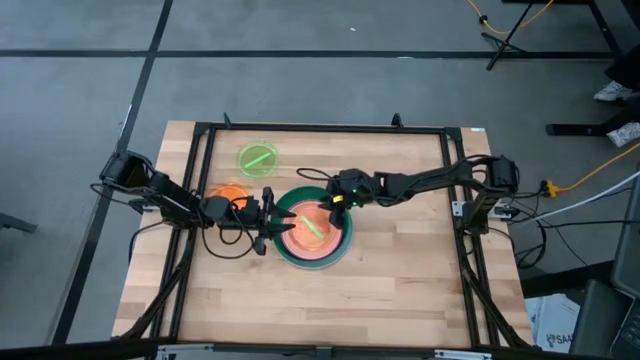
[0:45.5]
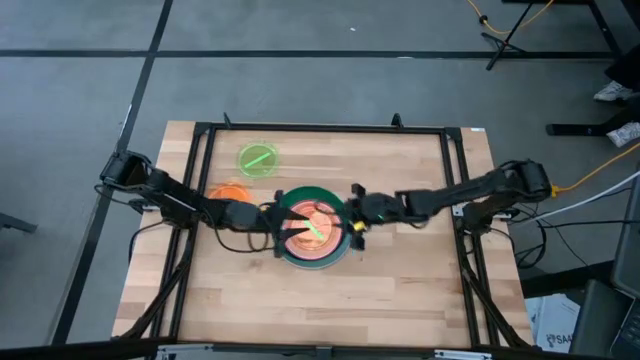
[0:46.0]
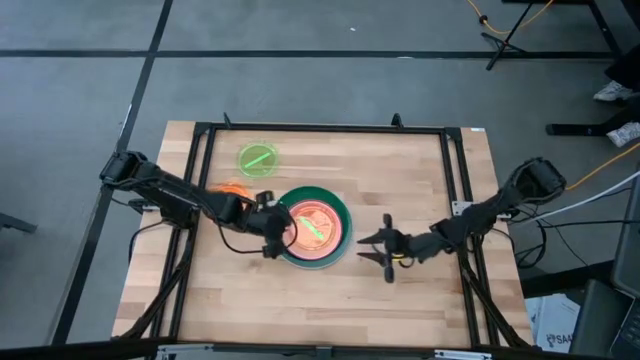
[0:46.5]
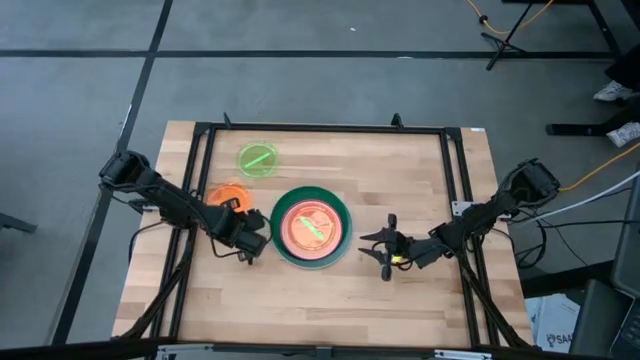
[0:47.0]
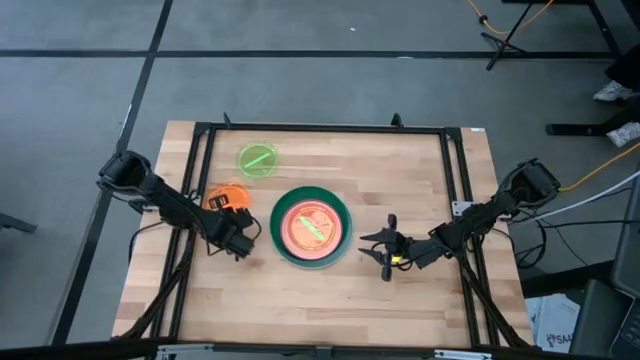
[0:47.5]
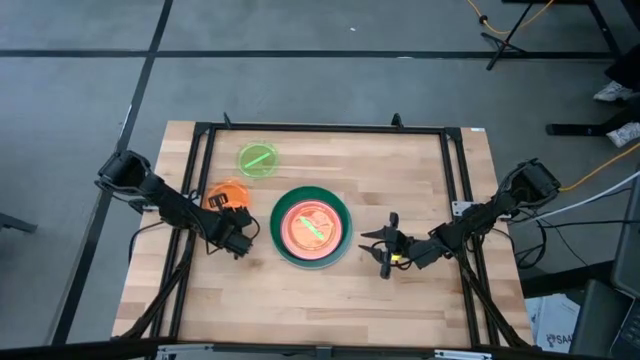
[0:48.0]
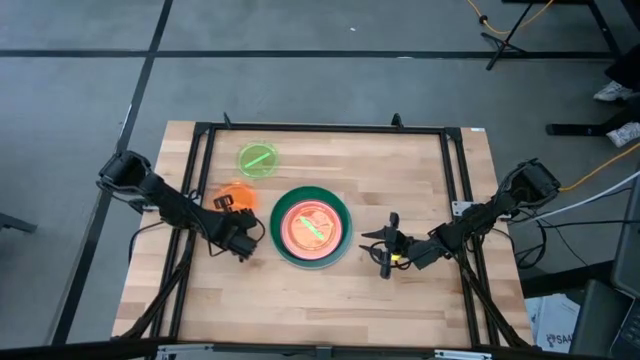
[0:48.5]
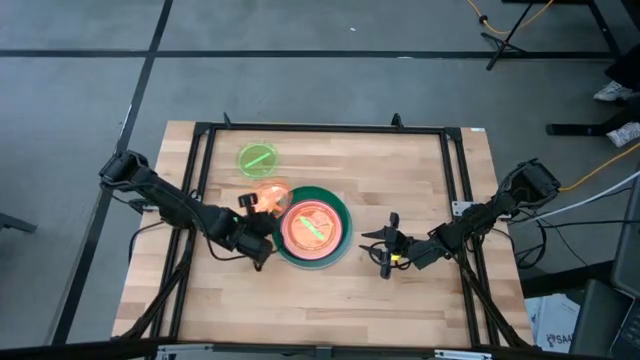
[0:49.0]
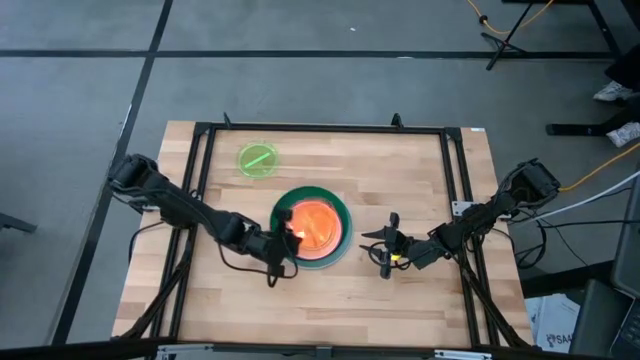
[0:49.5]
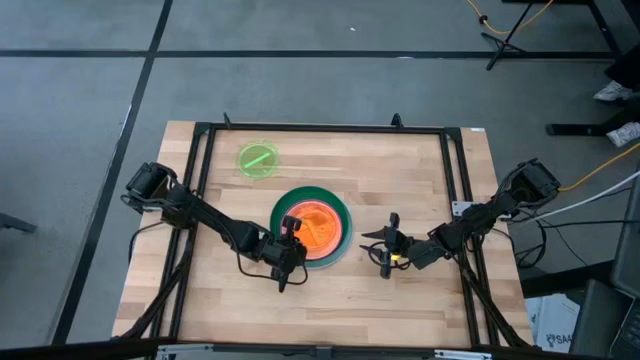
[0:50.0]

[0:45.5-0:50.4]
Task: Stack plastic plates
Stack the orange transparent plate on top of the green transparent plate

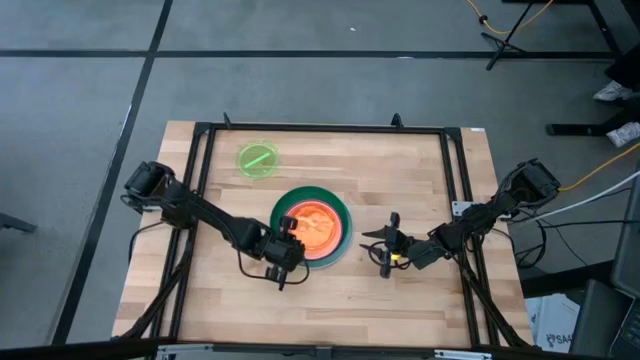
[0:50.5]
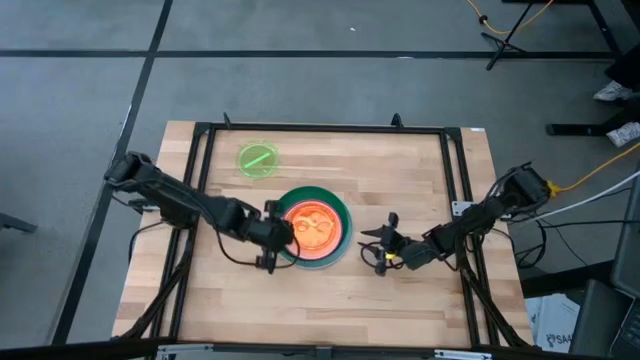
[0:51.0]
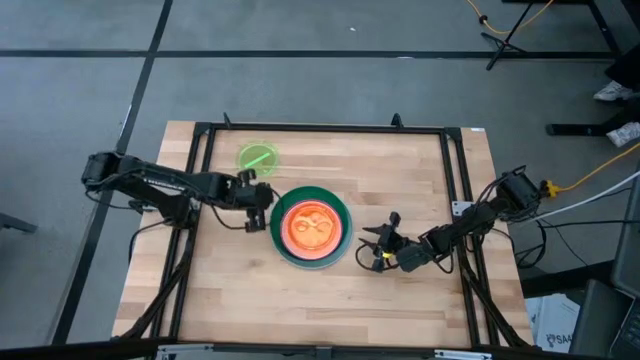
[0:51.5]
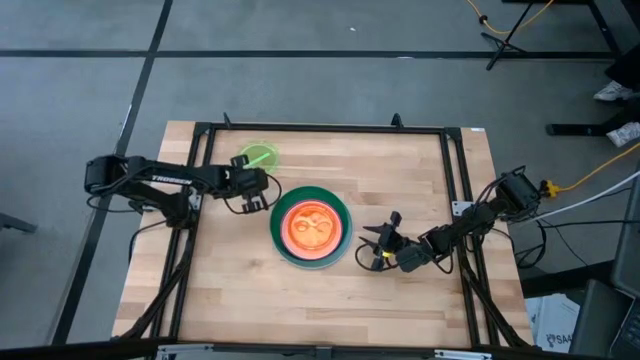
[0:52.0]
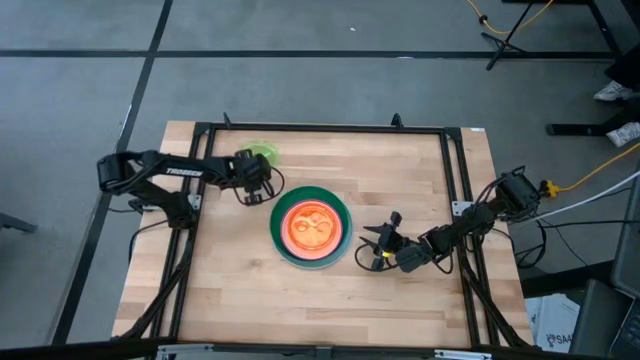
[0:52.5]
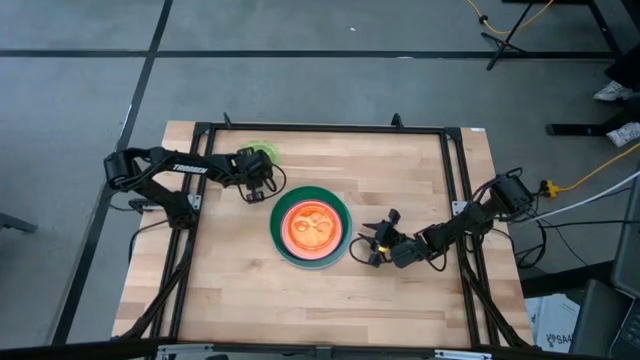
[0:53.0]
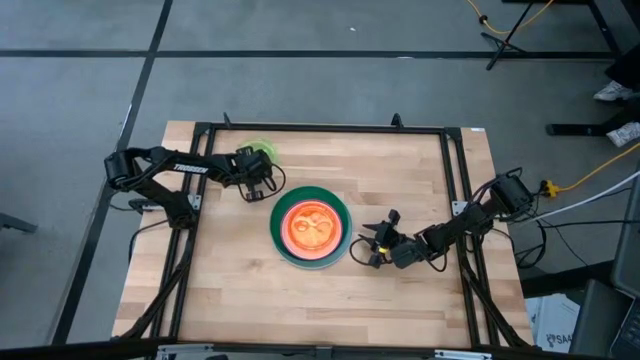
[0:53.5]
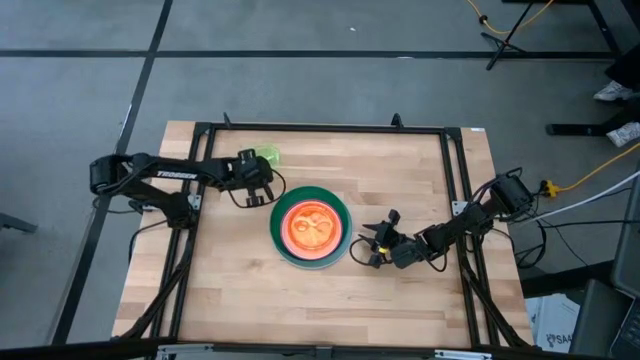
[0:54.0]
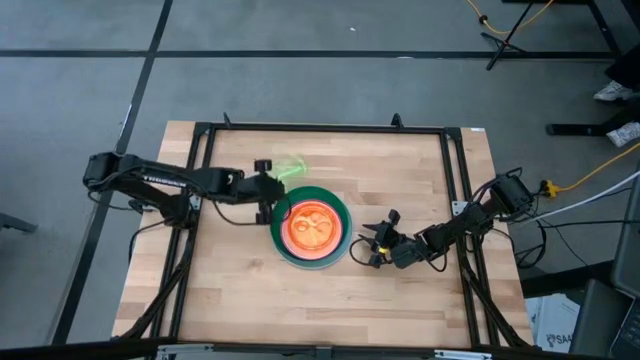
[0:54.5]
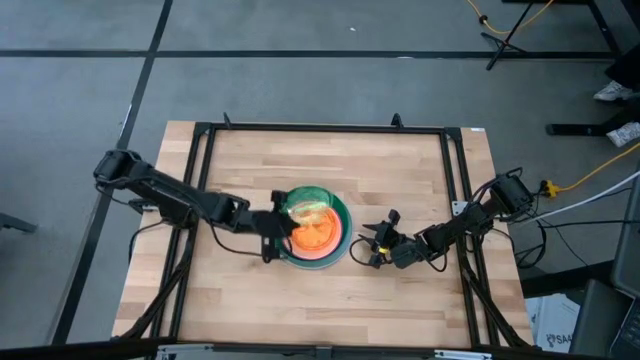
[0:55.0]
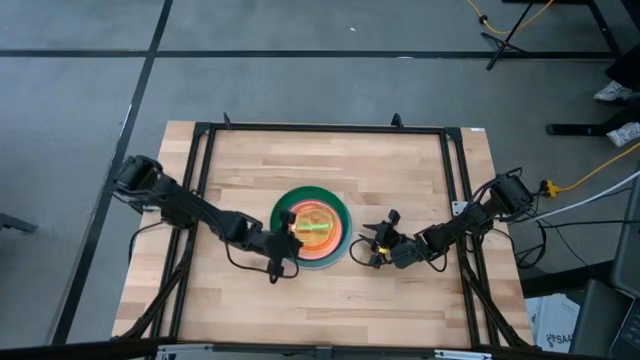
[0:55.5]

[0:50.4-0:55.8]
Stack the green transparent plate on top of the orange transparent plate

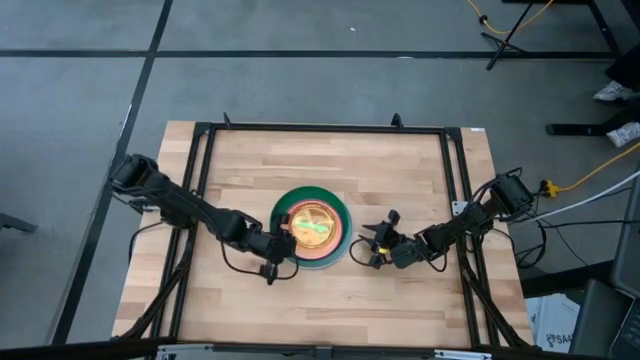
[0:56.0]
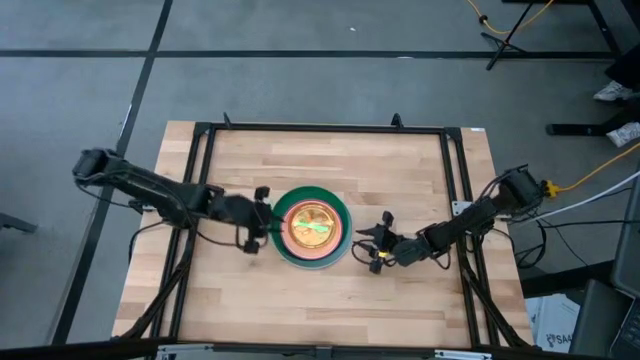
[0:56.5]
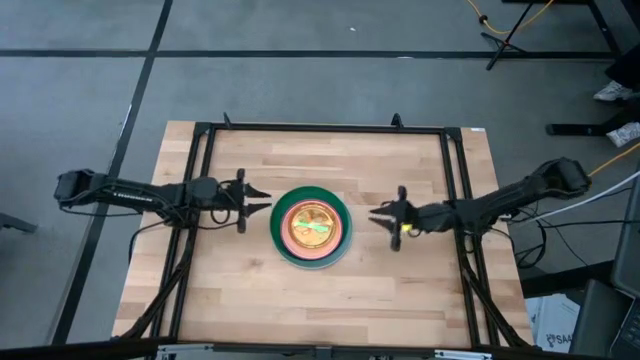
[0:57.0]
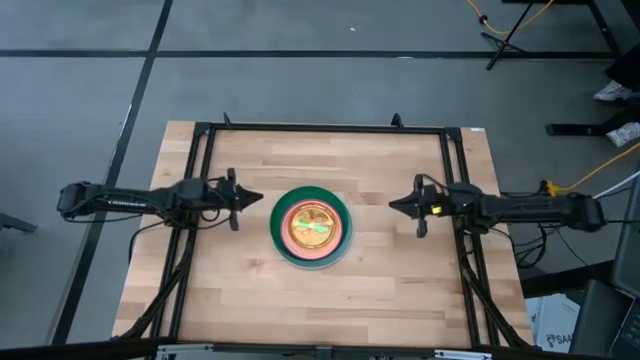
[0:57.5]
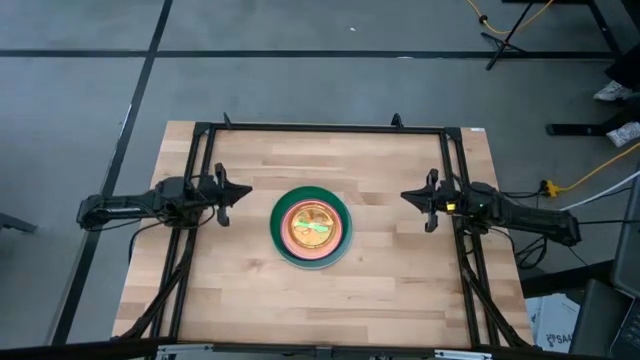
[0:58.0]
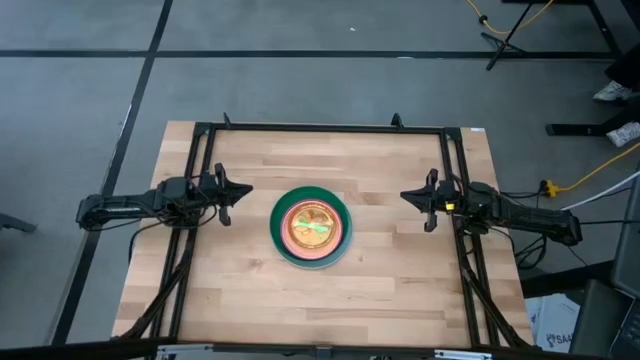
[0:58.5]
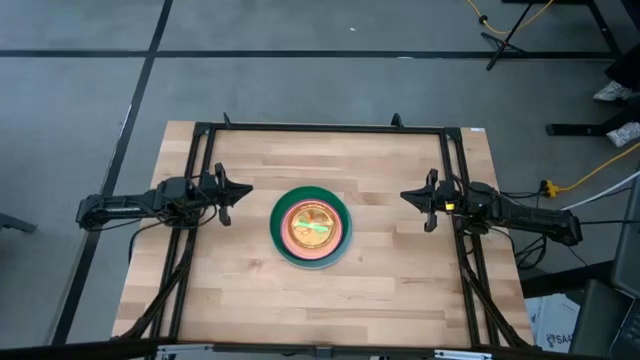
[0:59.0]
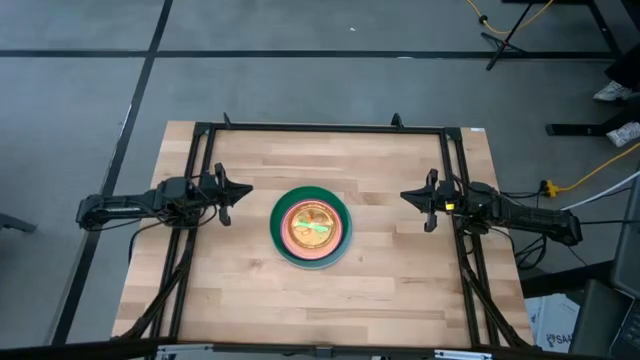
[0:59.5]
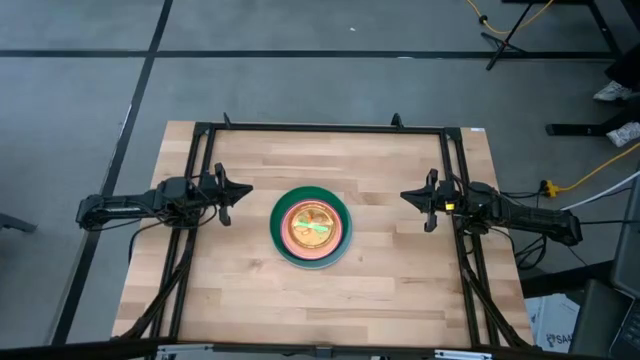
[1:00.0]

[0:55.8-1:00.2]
Return to Home Position

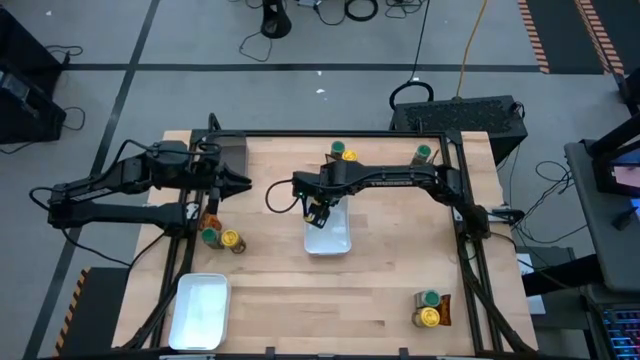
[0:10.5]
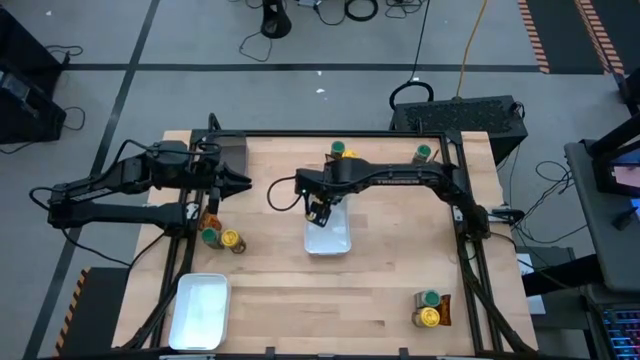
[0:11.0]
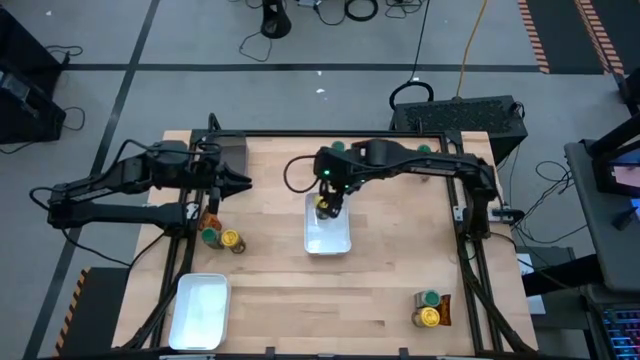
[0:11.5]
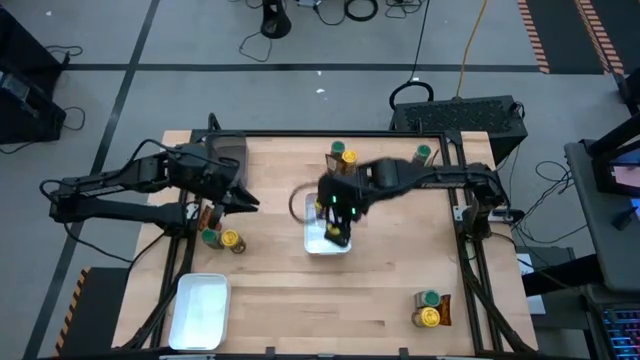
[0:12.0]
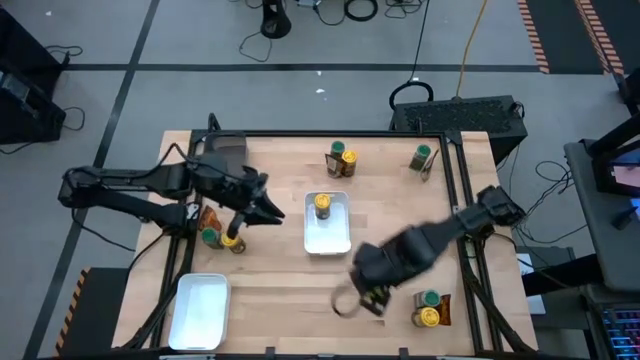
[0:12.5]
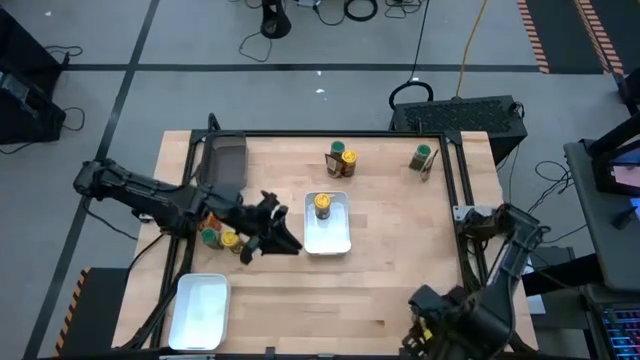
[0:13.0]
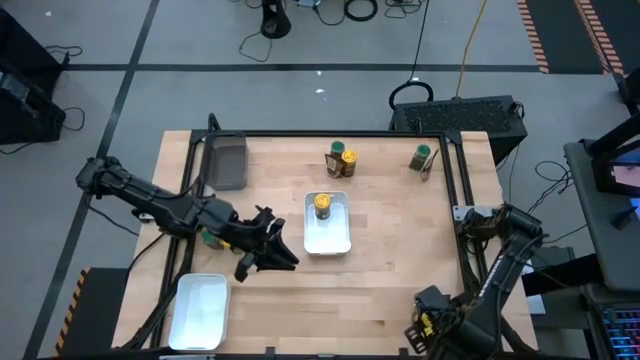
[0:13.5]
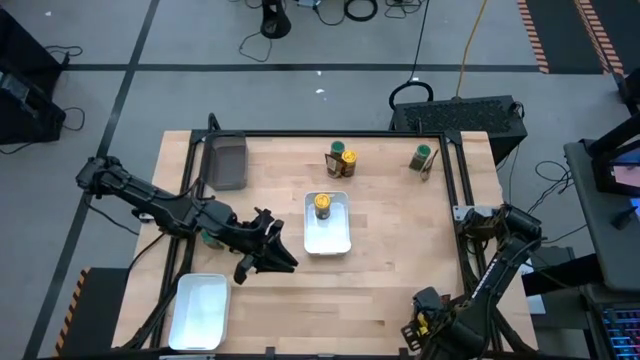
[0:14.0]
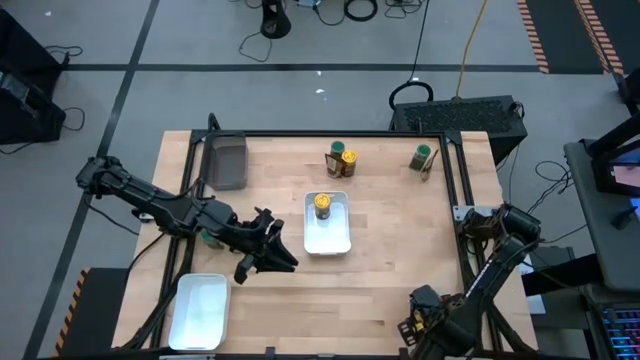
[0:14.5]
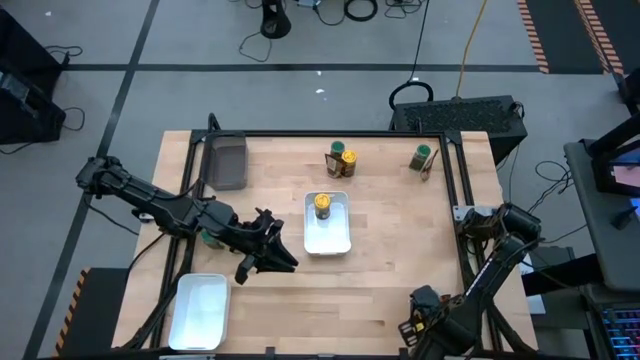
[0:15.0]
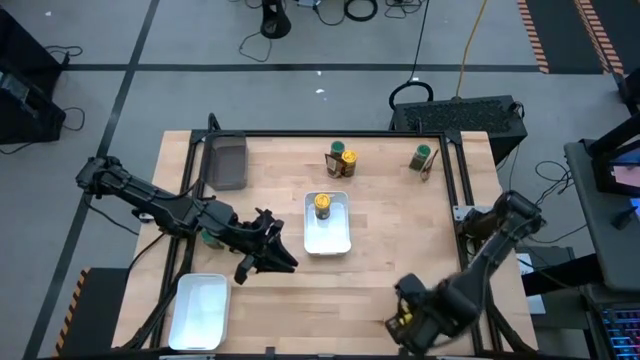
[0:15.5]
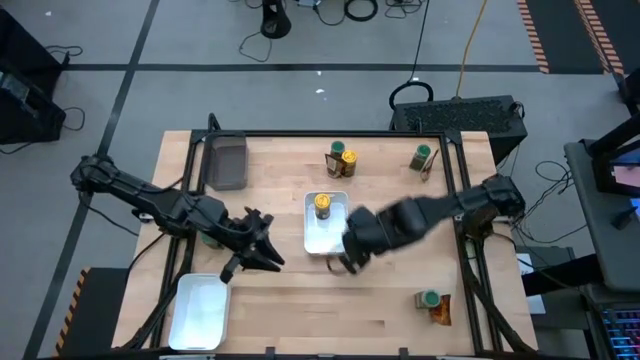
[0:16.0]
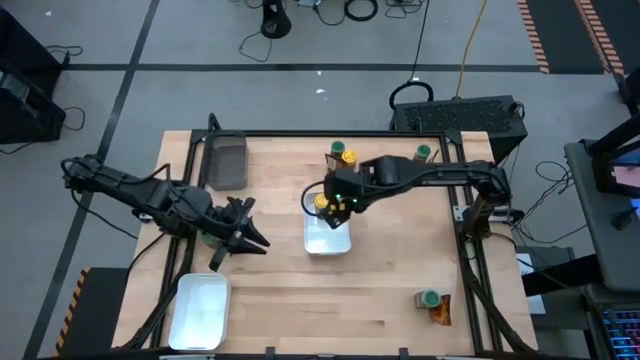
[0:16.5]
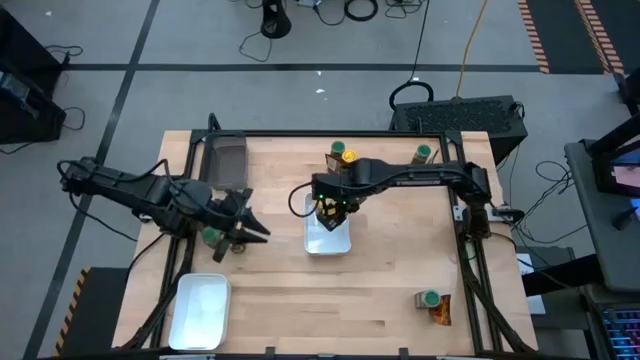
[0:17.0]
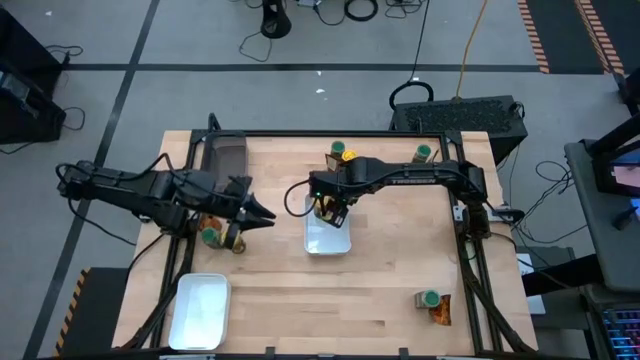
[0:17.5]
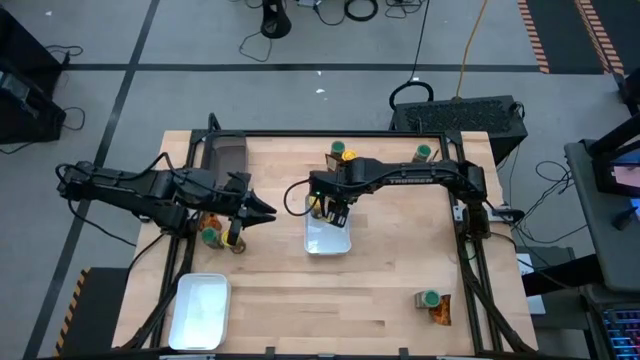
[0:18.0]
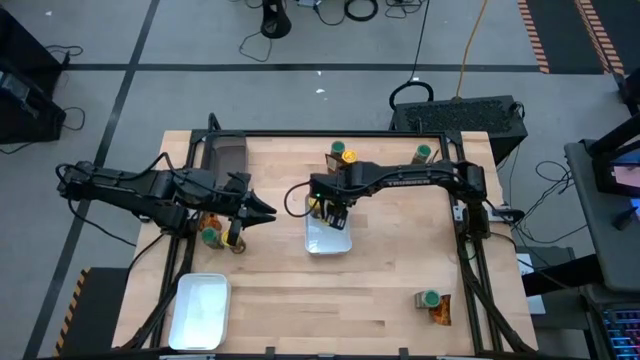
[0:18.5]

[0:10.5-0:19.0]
Task: Sort spices by type
Put the bottom right yellow spice bottle into the top white bin
